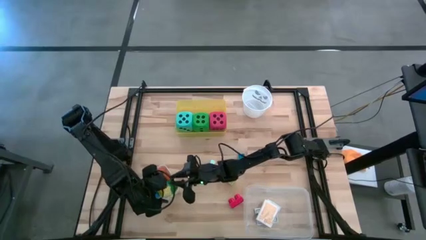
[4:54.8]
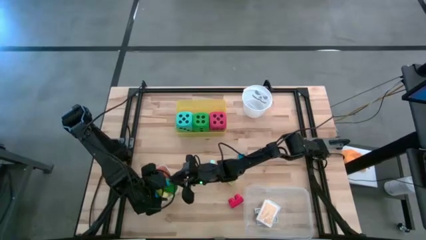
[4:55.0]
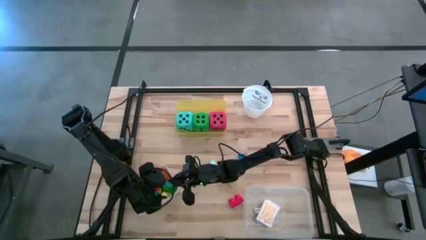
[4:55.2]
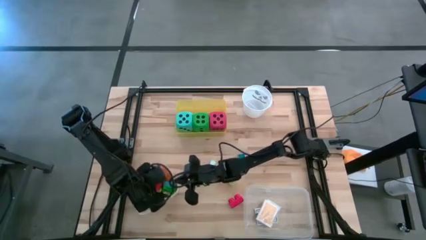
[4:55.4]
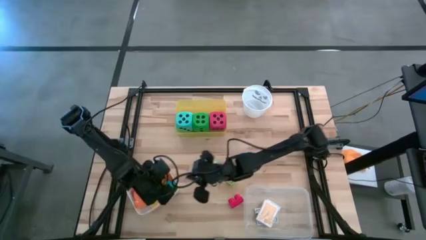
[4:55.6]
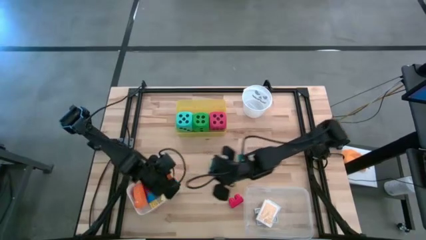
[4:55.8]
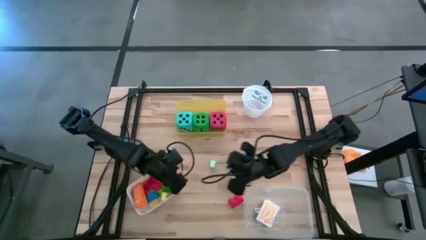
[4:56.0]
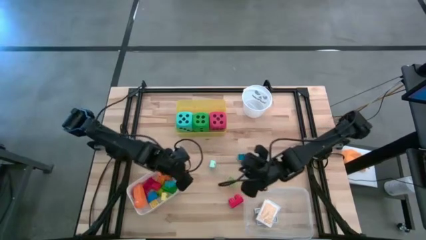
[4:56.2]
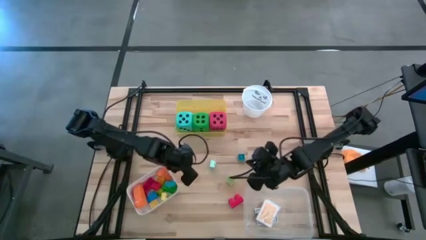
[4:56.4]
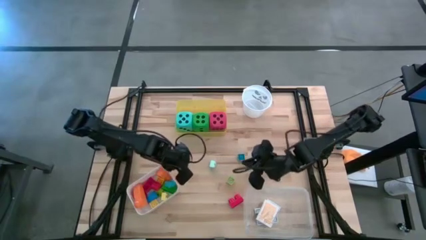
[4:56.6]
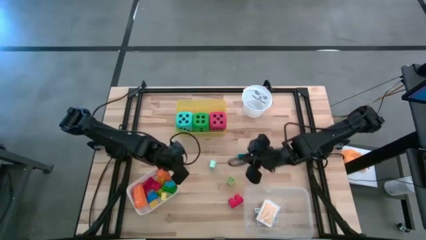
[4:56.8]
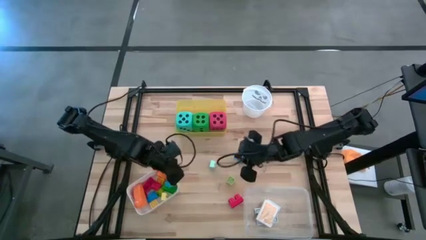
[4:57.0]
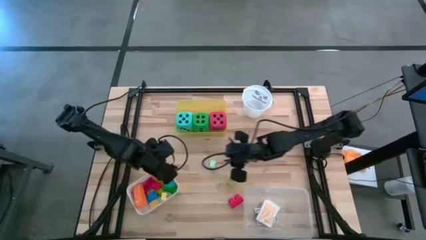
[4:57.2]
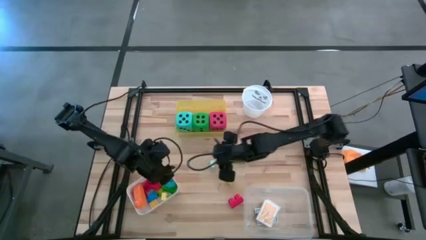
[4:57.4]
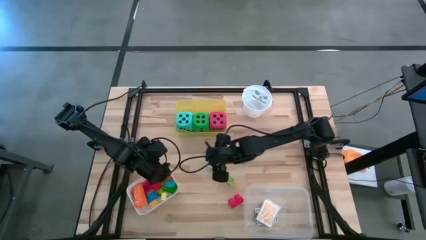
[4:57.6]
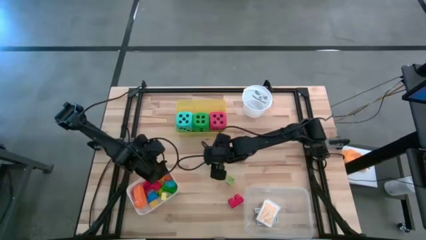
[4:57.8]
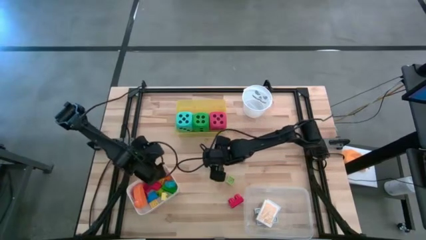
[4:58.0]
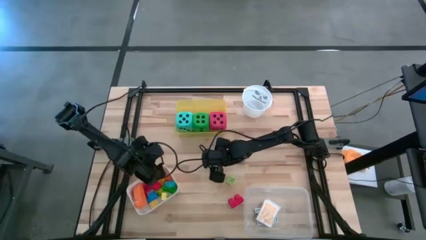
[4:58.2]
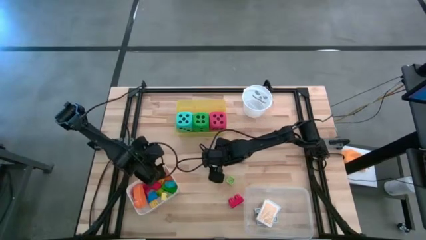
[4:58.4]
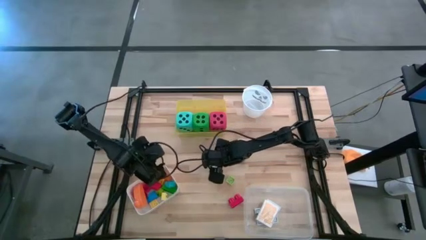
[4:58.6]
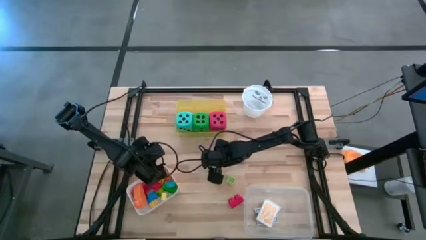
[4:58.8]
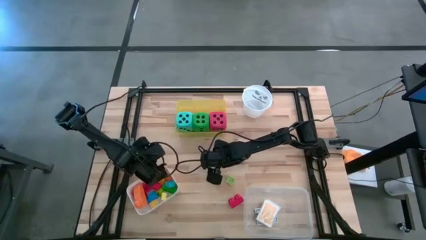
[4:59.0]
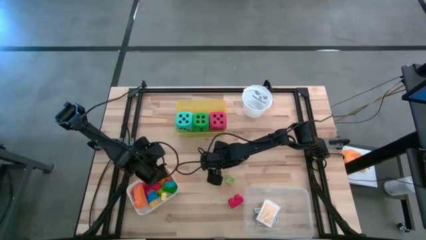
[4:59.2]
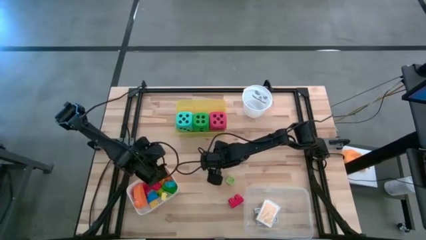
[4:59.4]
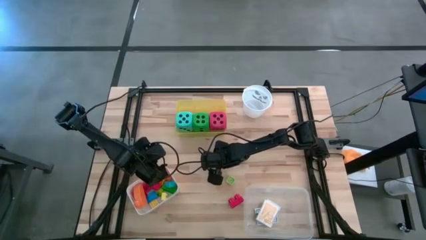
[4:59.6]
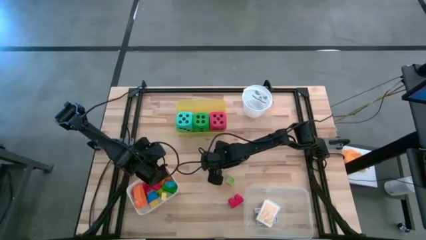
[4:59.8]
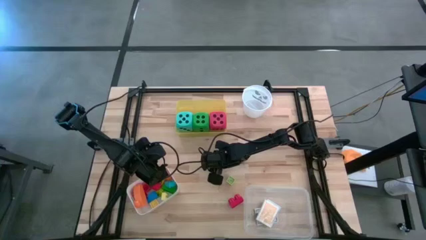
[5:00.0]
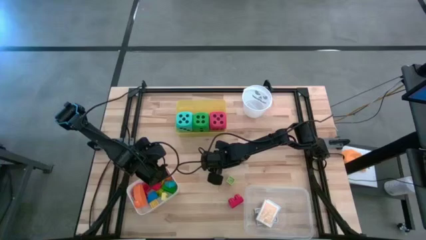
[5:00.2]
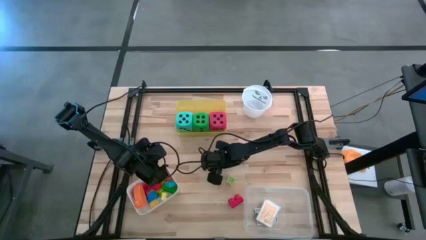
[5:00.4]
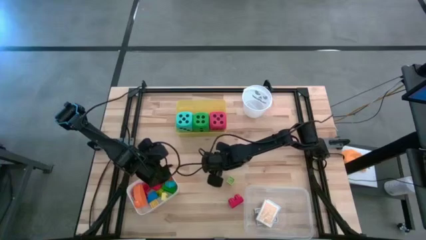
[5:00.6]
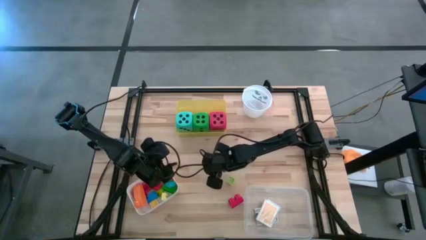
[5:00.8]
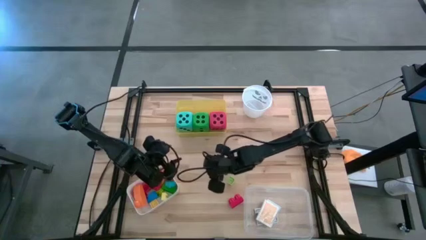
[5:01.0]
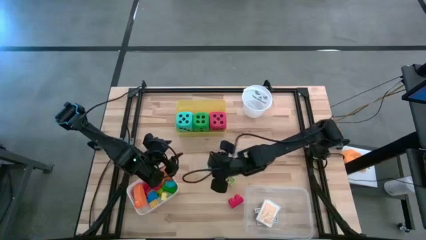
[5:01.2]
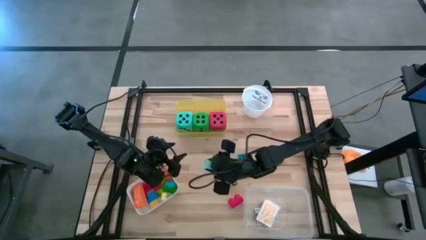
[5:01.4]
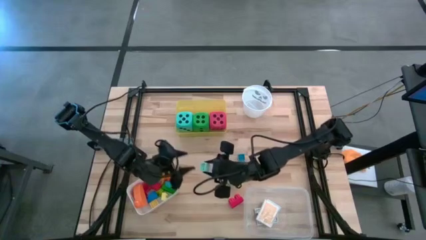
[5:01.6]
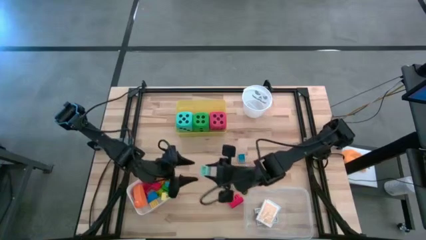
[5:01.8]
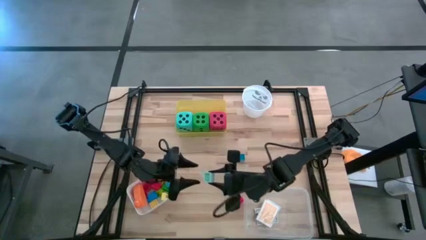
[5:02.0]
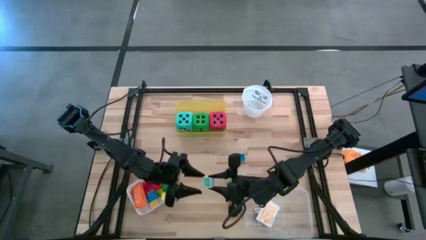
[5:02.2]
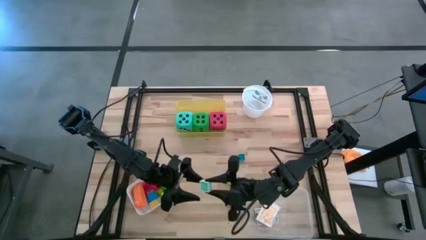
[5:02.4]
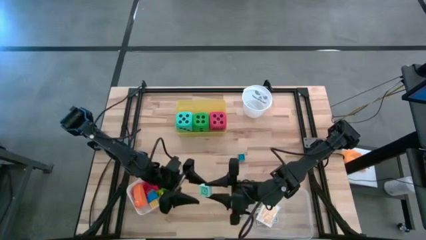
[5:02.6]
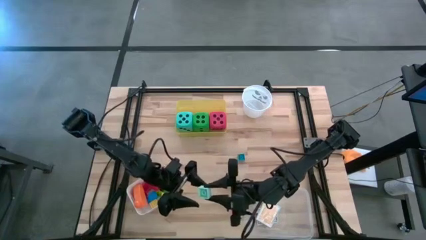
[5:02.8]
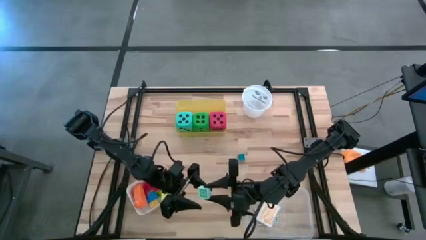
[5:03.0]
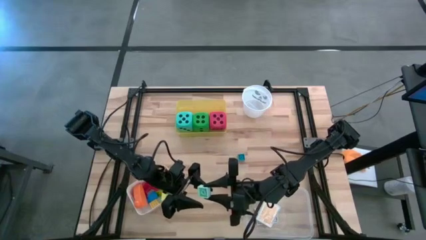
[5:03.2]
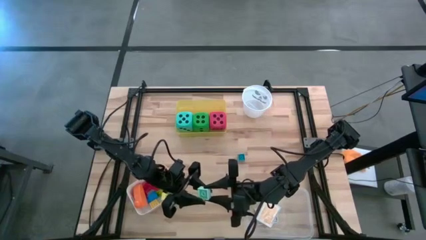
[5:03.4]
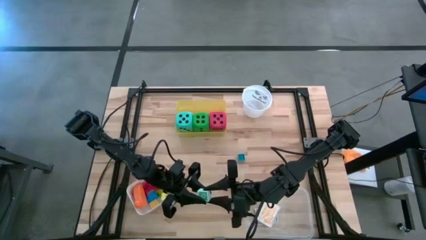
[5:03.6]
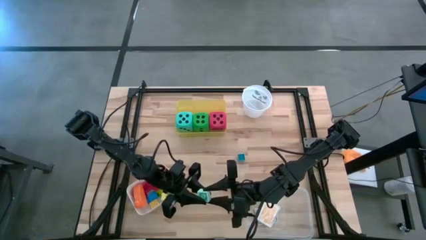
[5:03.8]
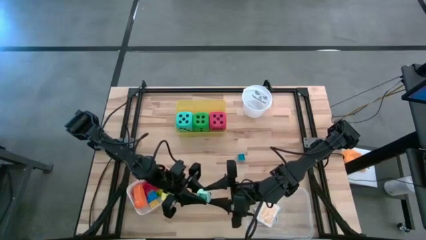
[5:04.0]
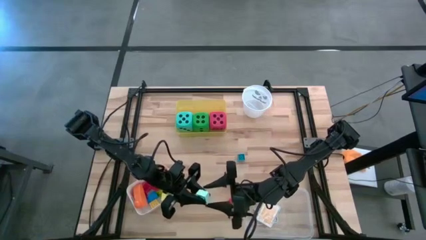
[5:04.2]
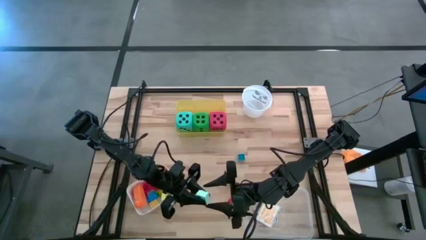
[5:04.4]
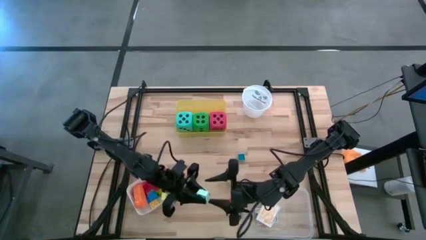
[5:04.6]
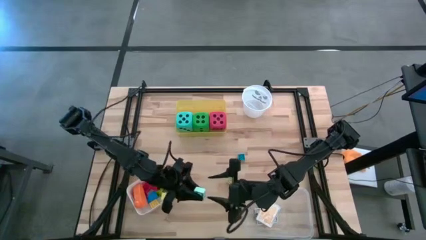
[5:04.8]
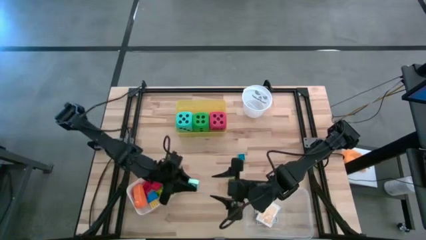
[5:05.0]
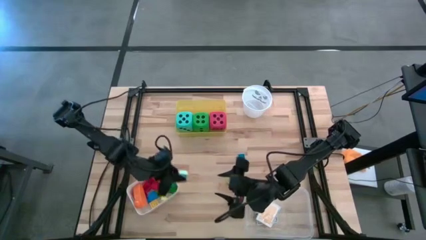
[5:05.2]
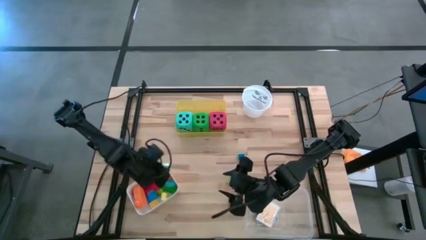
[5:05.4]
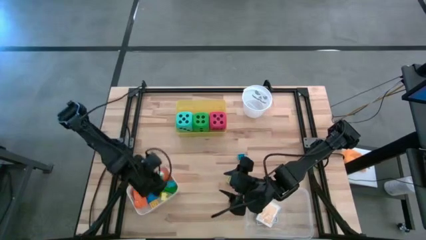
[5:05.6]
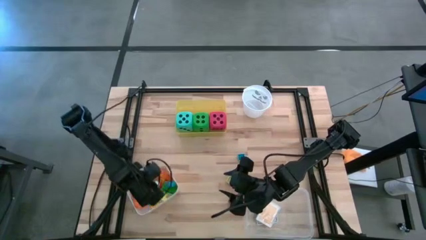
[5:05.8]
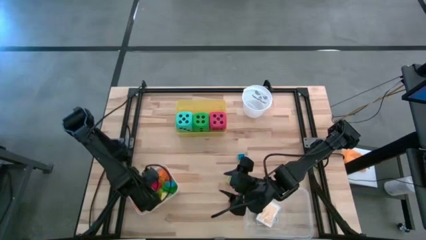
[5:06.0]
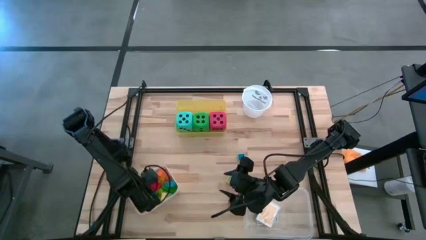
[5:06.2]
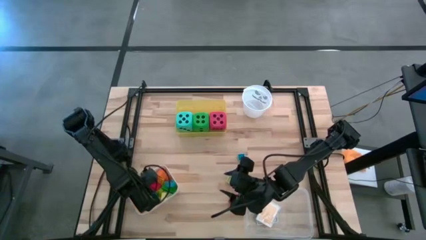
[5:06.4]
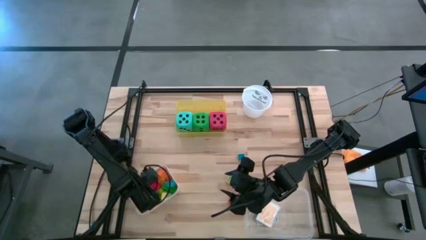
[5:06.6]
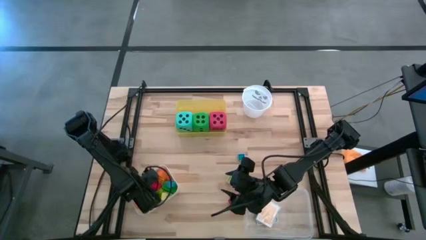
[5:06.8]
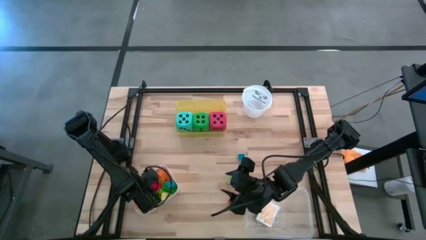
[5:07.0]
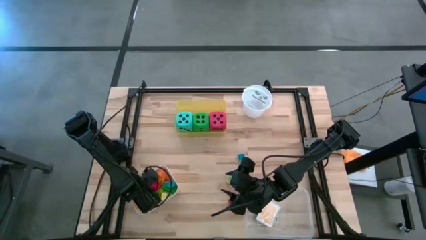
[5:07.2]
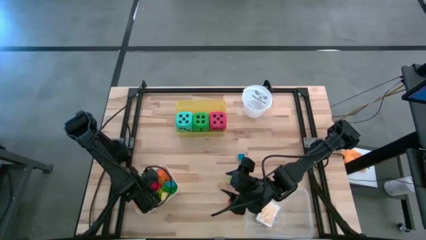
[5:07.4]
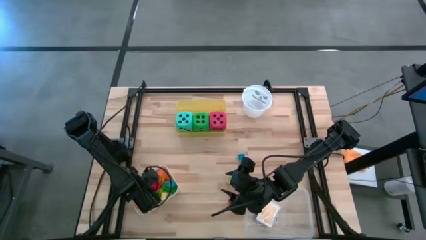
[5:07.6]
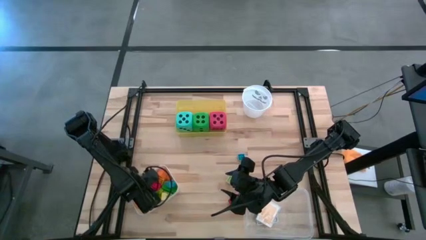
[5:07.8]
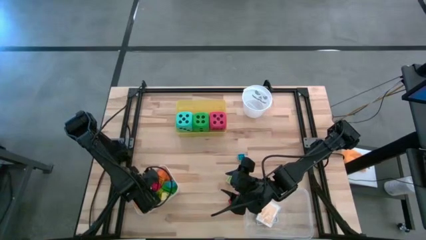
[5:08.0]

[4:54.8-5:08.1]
Task: Pick & Place Toys
Put the light blue game piece into the white bin

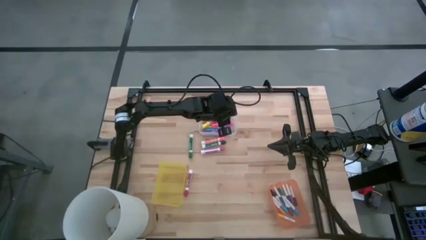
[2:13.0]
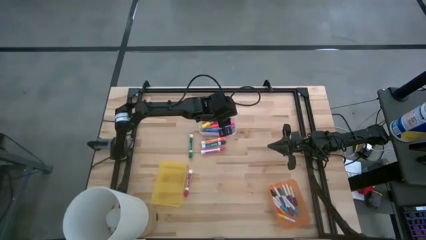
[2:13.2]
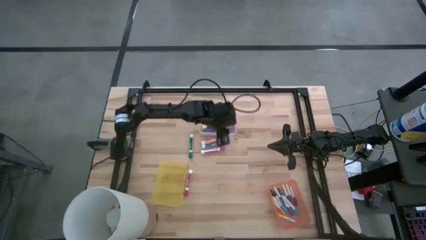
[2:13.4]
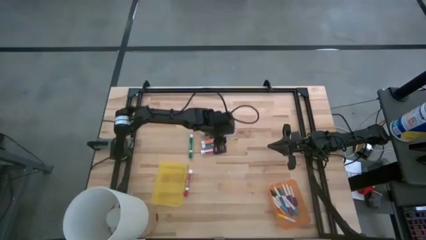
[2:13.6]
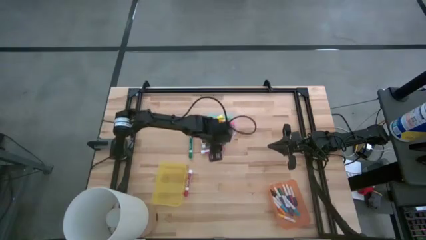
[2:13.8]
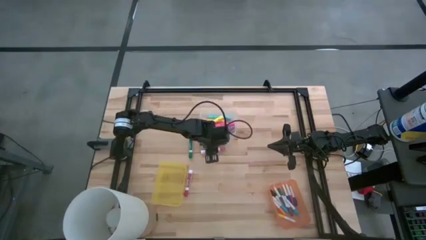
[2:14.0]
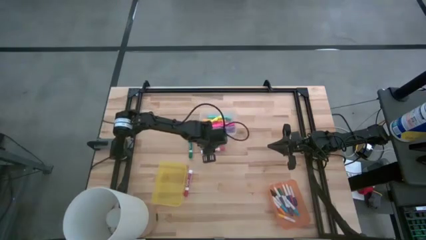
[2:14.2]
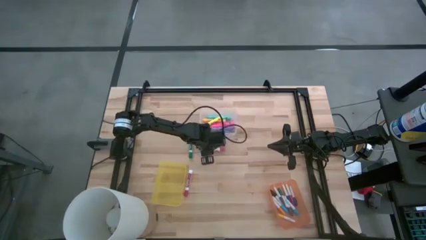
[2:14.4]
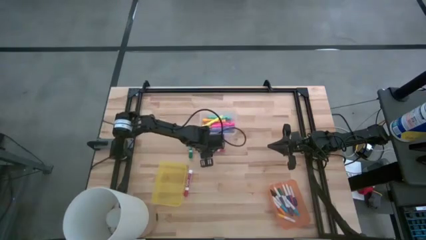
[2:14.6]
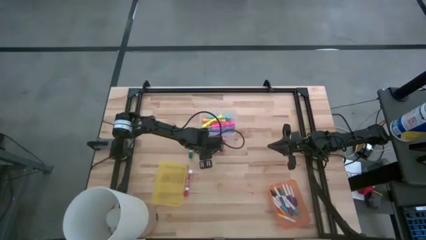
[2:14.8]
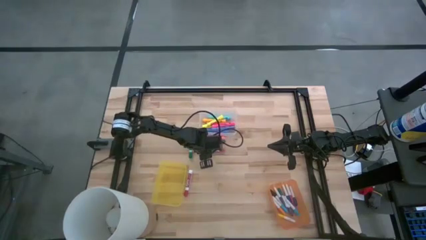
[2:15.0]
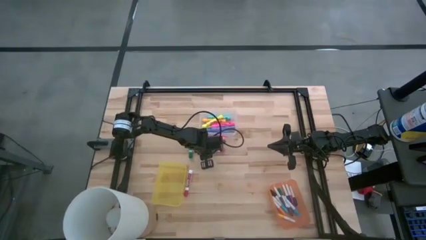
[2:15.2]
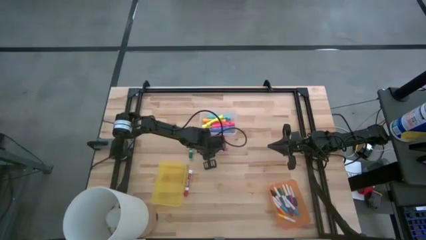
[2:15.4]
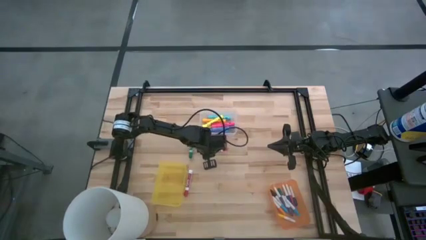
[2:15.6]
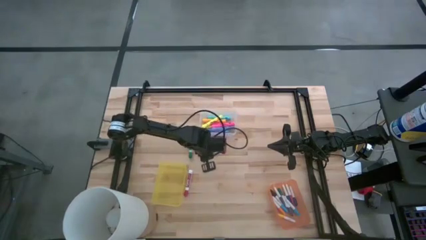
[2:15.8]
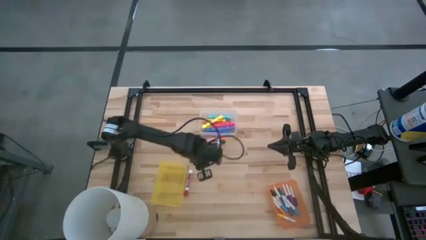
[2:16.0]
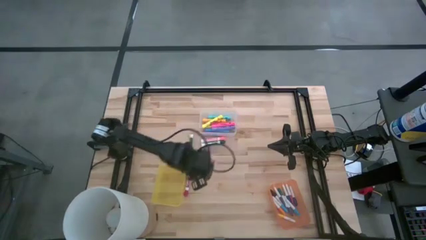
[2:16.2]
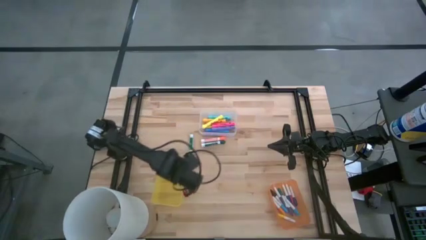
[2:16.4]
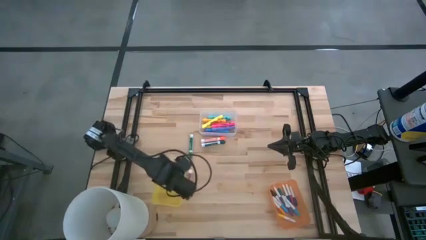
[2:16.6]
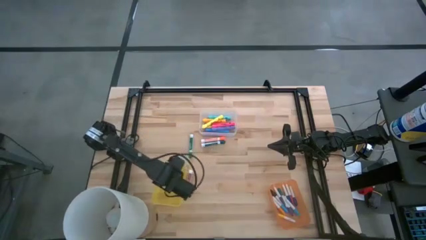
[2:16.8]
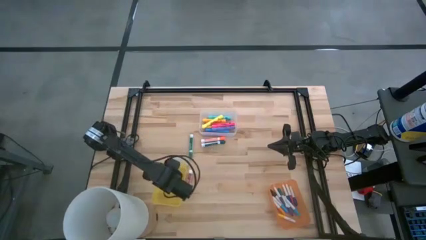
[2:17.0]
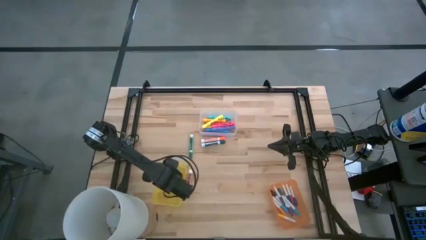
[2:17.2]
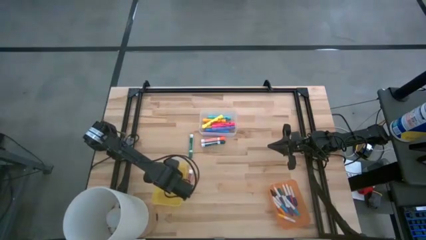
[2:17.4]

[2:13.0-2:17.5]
Task: Pick & Place Markers
Put the pink marker pen into the yellow bin
